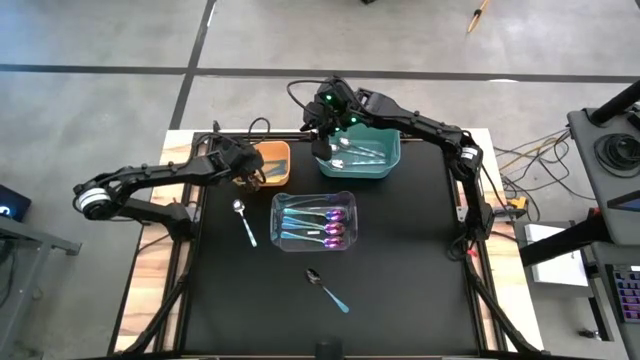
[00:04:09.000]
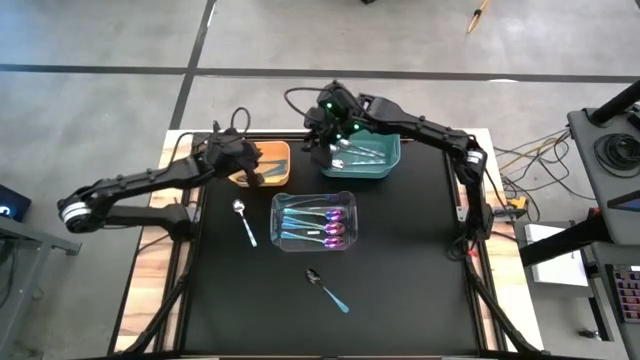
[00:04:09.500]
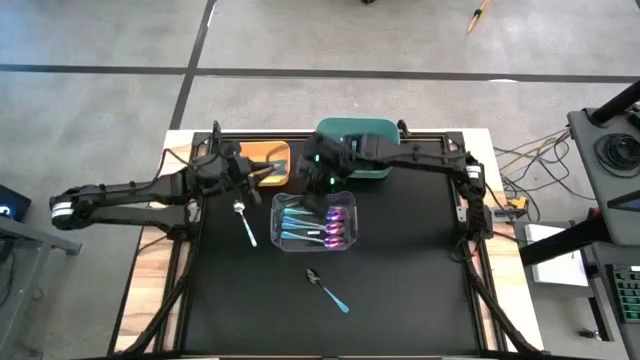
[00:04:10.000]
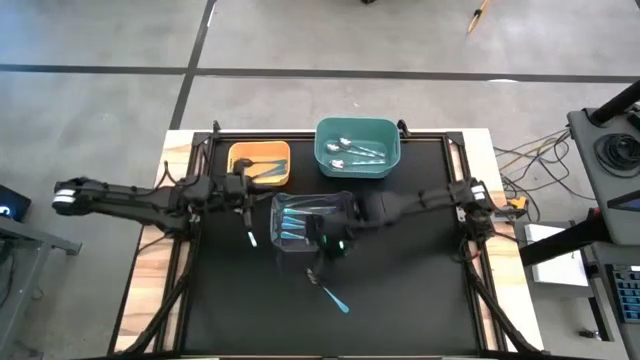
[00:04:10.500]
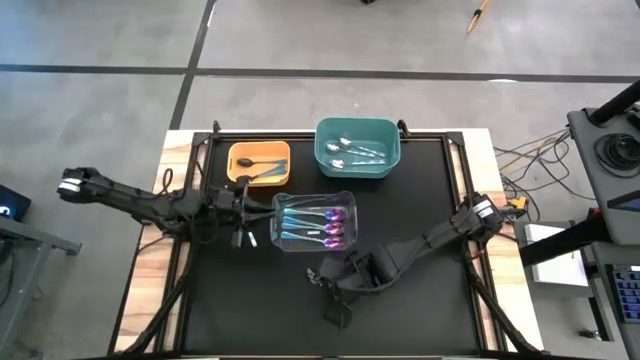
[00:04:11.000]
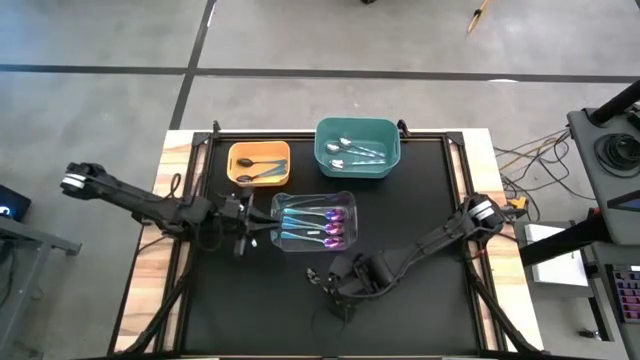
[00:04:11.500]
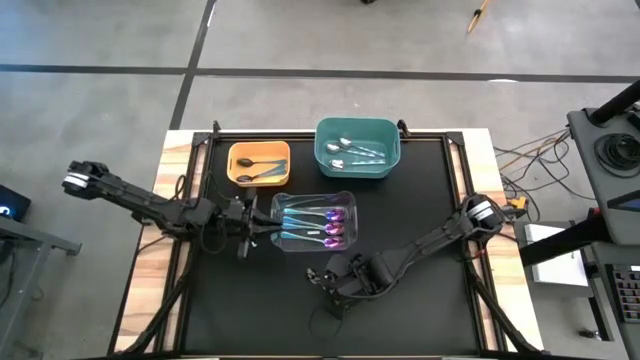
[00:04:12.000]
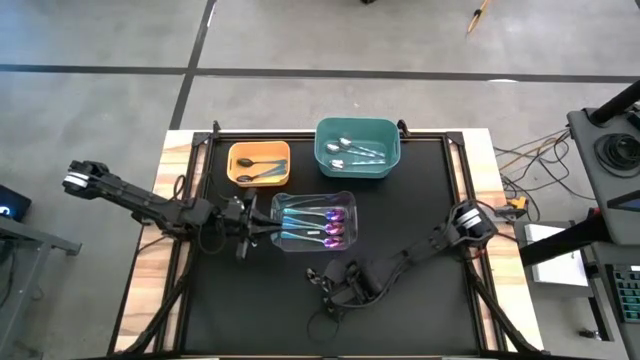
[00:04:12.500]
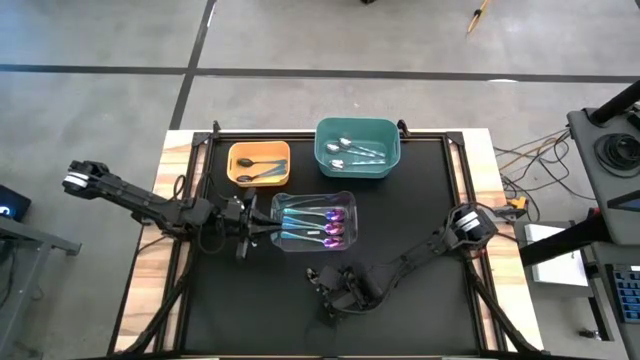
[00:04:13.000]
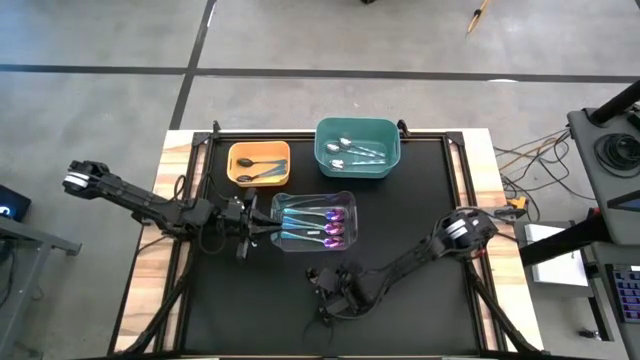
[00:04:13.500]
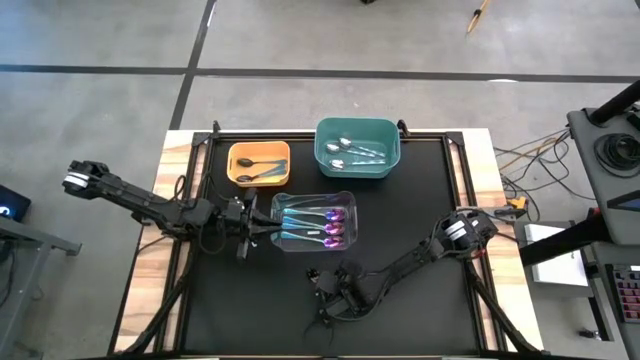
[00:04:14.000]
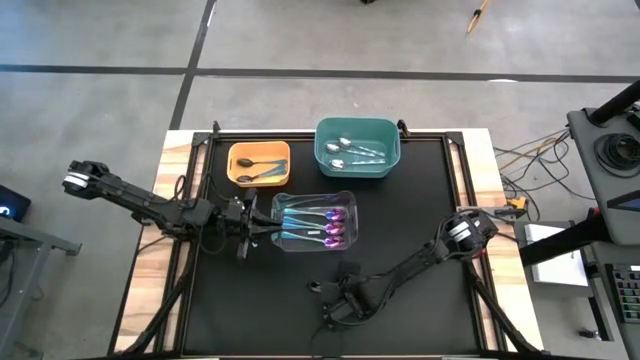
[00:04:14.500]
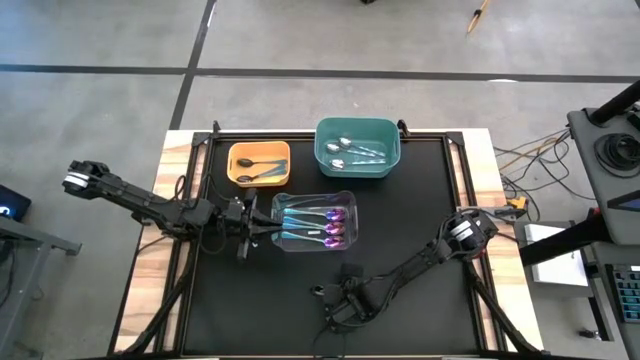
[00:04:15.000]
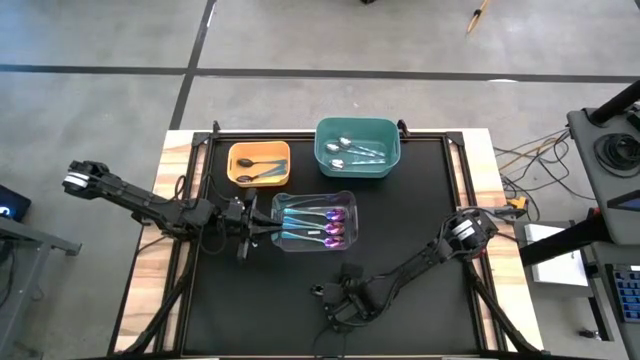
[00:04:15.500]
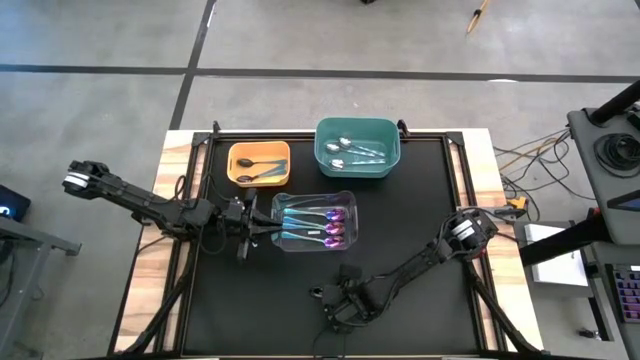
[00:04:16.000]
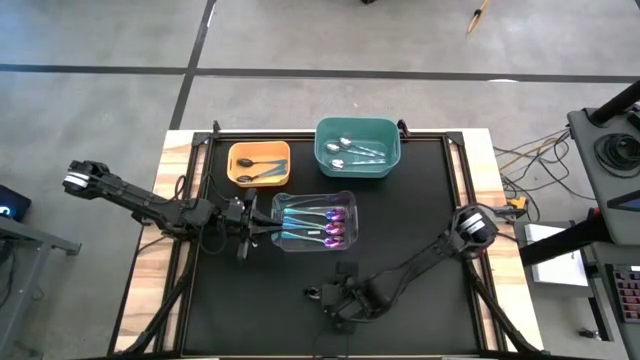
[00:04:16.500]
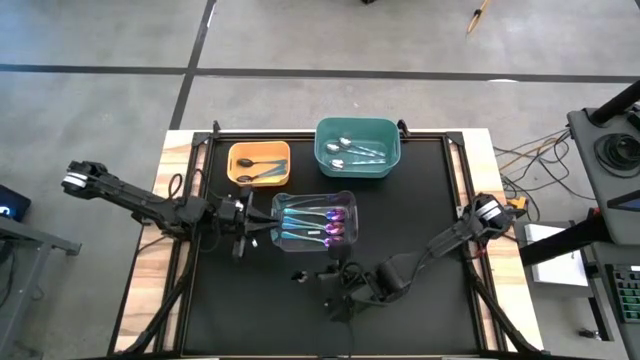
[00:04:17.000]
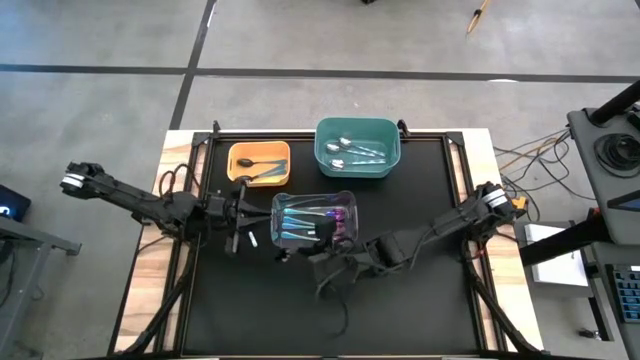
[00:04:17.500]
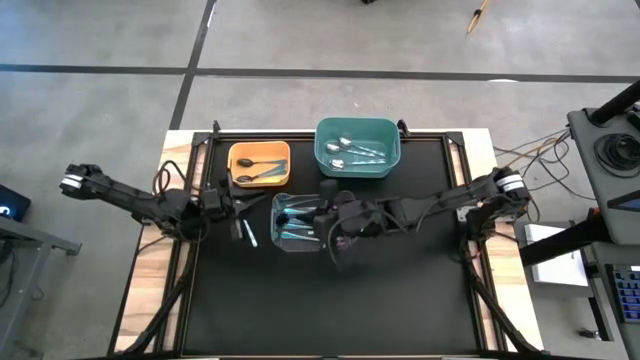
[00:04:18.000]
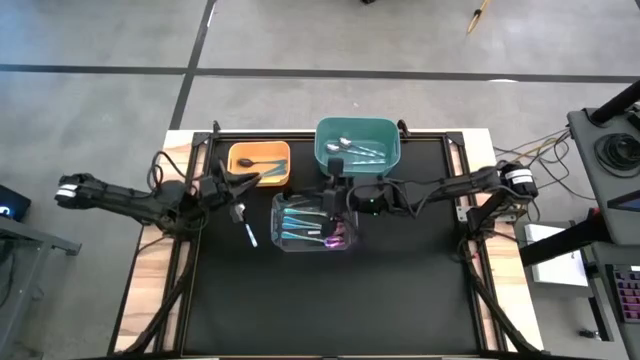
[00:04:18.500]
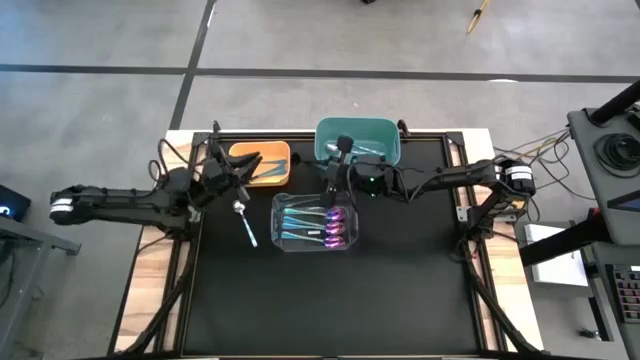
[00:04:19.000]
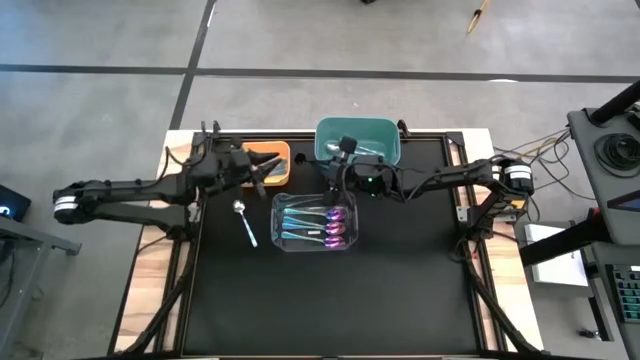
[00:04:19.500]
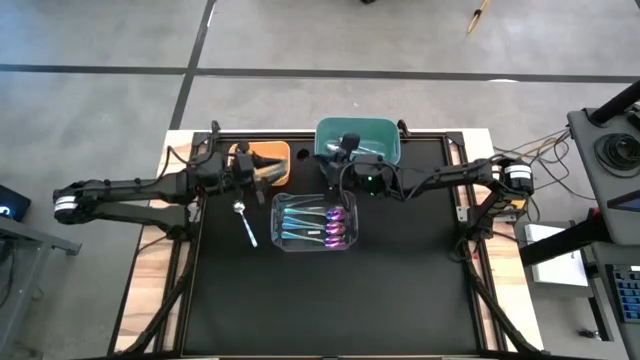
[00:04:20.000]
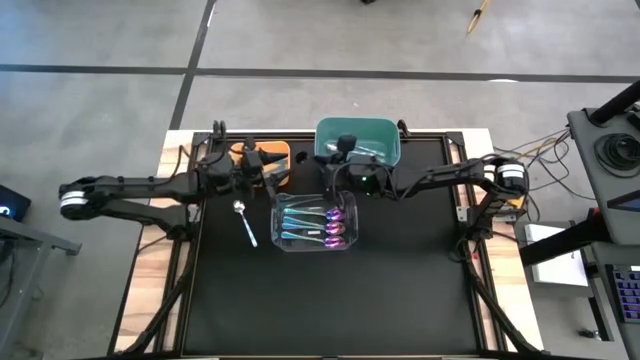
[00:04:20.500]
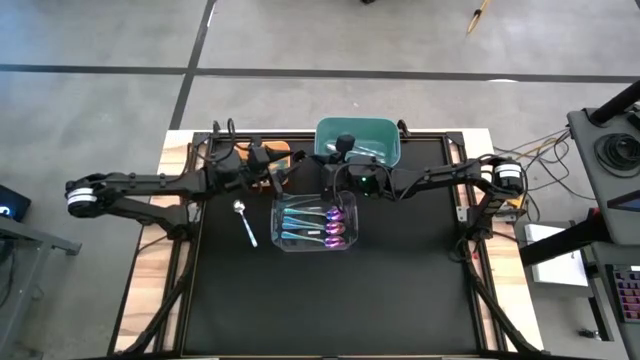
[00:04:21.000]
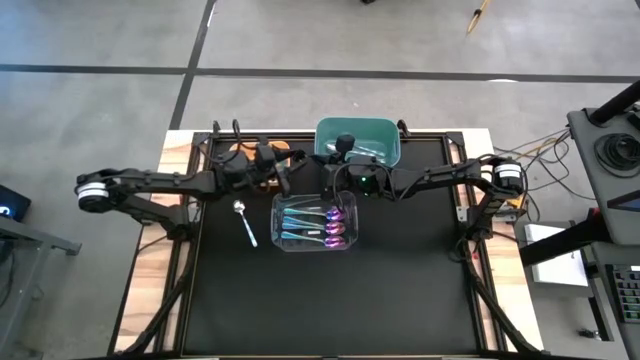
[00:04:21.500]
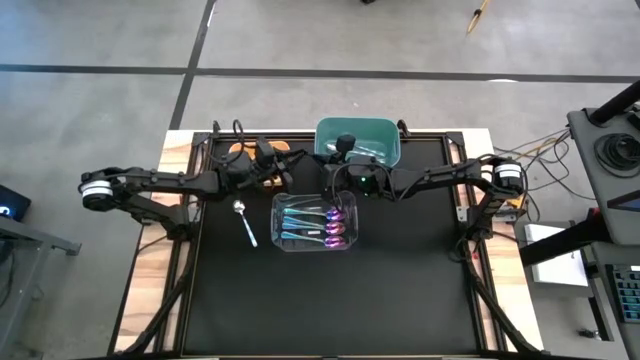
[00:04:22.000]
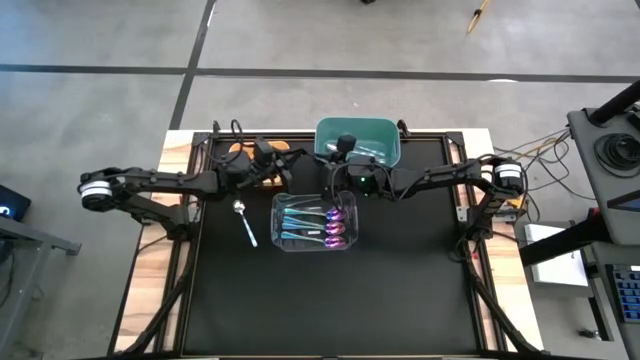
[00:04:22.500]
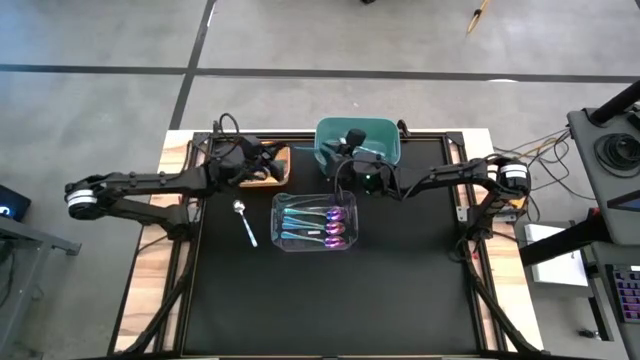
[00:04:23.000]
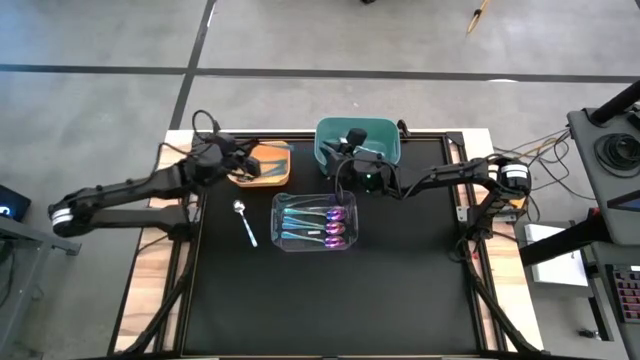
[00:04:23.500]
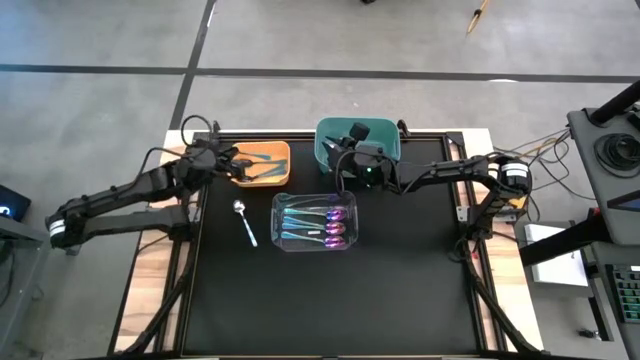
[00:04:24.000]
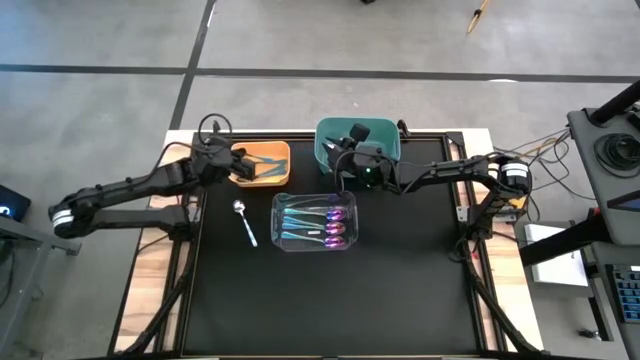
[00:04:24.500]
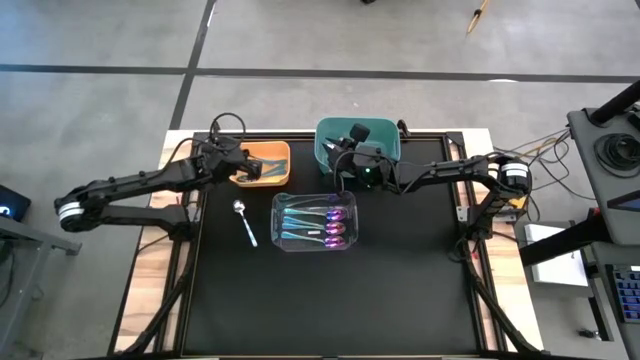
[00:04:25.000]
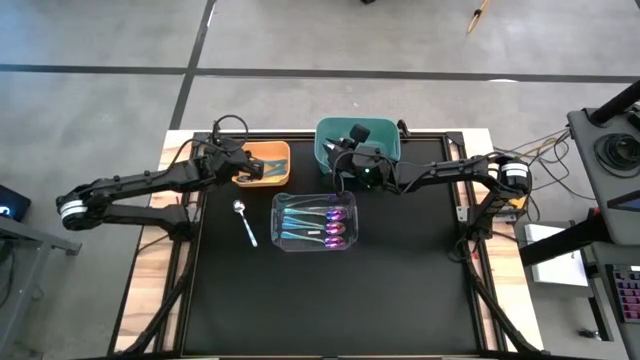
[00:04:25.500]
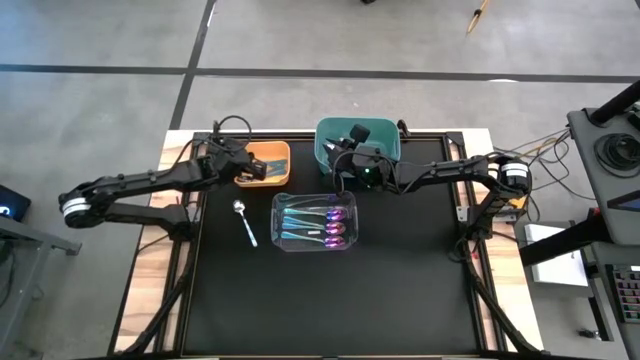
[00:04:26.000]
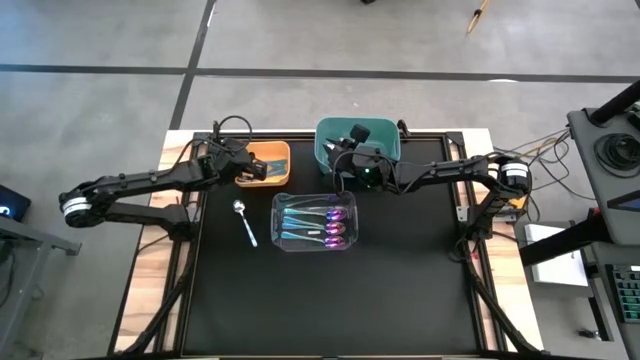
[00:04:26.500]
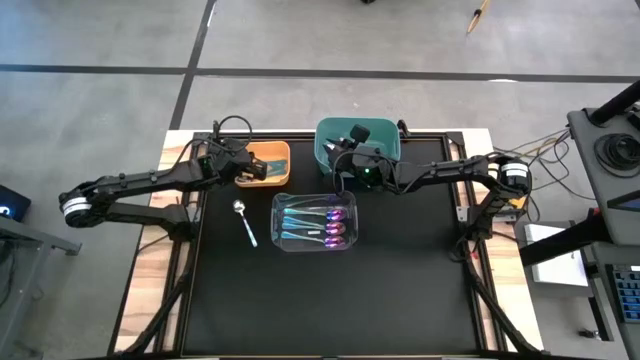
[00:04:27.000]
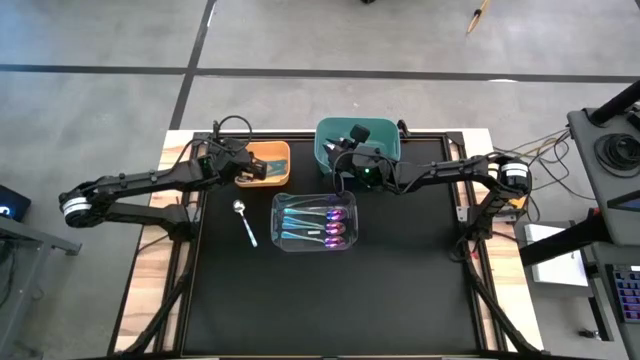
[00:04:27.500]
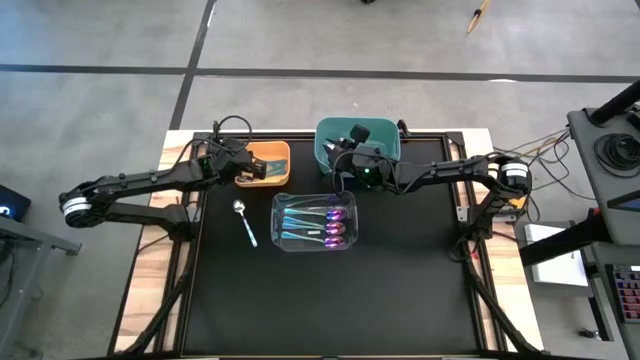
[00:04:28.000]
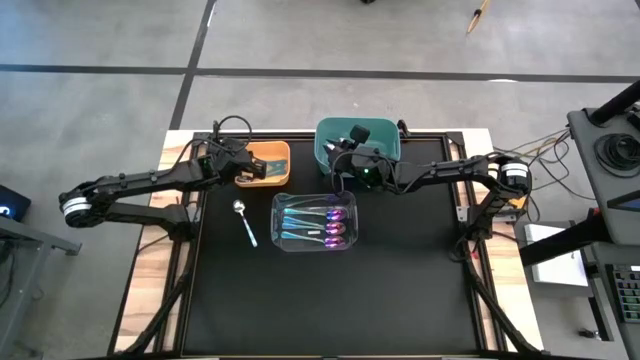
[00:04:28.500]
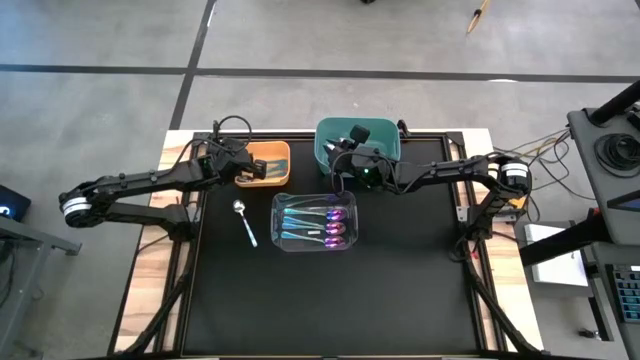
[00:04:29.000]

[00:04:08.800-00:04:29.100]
Task: Sort silverware by color (type)
Put the blue spoon into the yellow bin

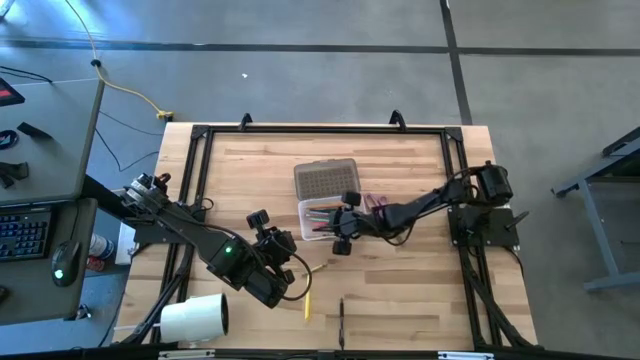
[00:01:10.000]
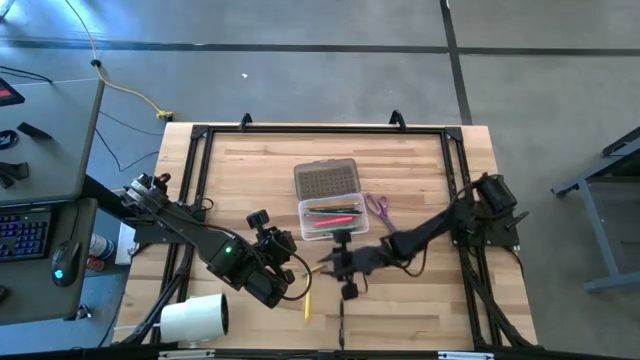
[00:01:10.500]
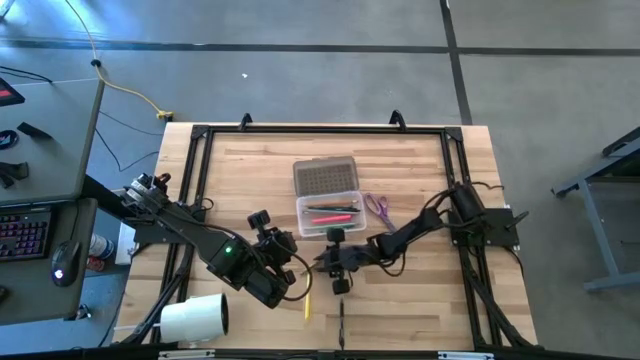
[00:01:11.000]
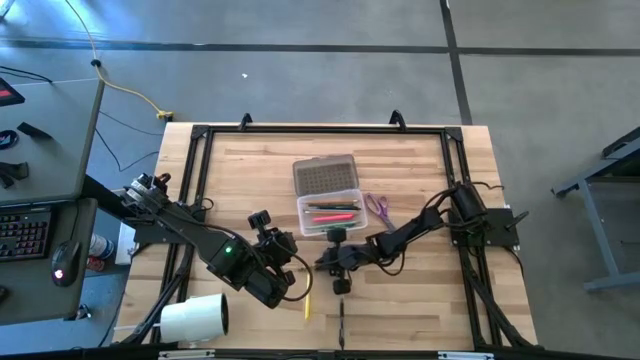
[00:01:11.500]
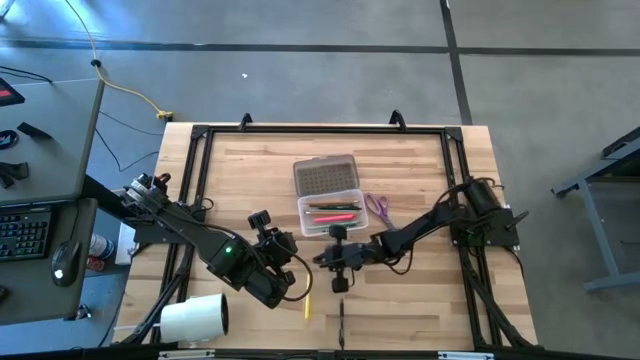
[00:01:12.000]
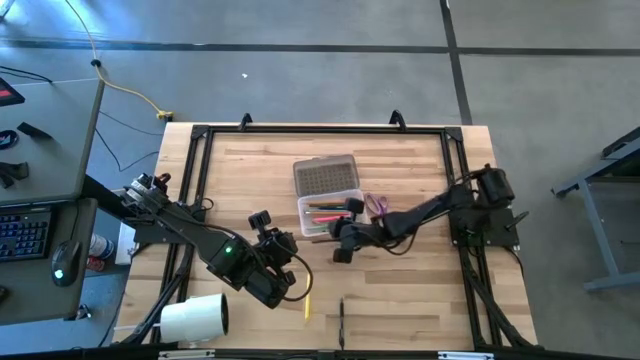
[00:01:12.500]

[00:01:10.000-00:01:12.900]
Task: Pick & place school supplies into a supply box
Put the yellow crayon into the black supply box
